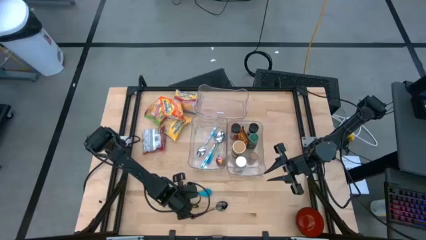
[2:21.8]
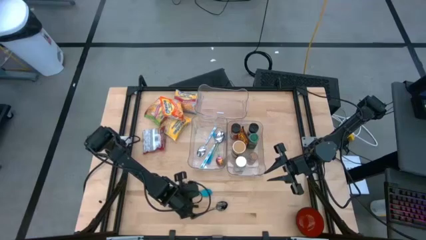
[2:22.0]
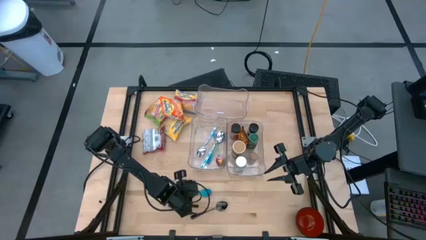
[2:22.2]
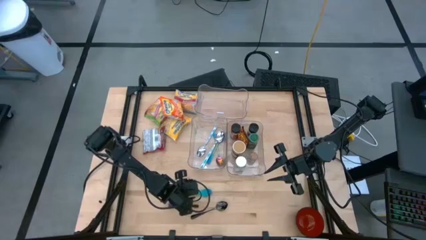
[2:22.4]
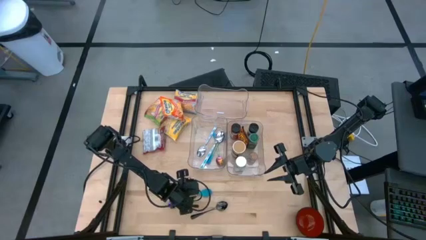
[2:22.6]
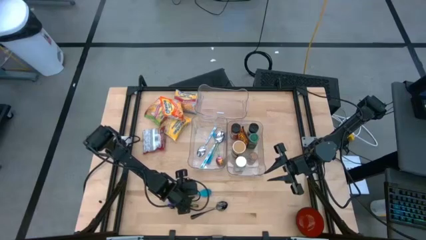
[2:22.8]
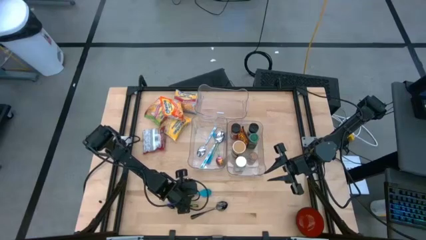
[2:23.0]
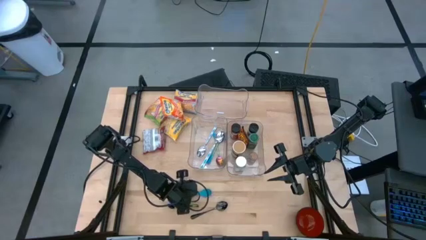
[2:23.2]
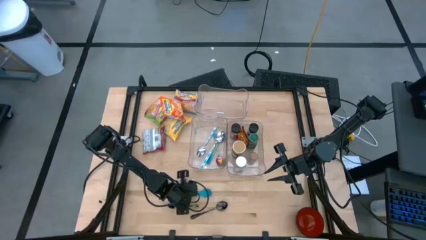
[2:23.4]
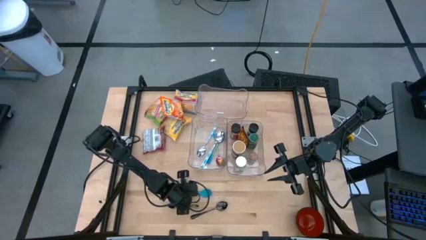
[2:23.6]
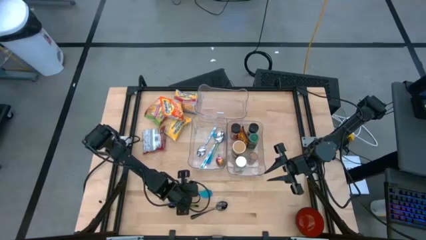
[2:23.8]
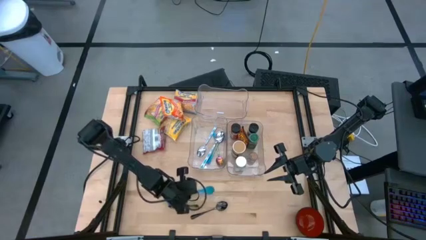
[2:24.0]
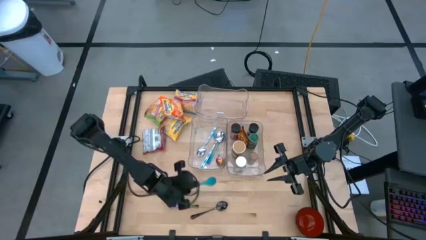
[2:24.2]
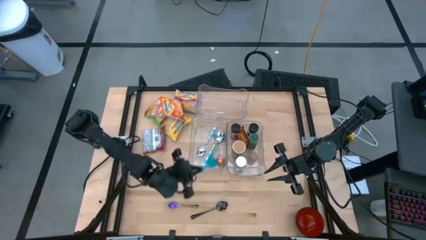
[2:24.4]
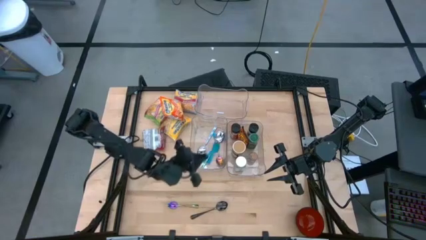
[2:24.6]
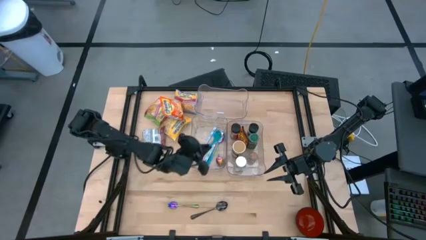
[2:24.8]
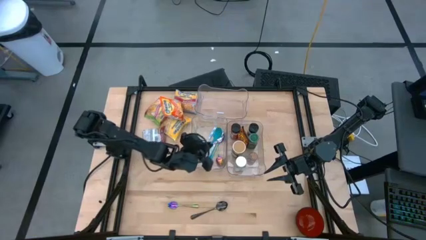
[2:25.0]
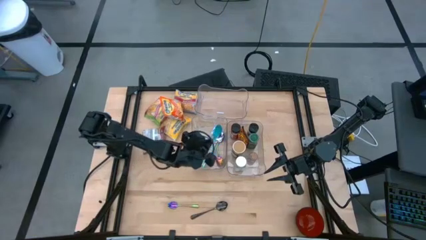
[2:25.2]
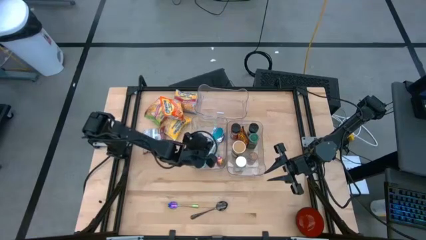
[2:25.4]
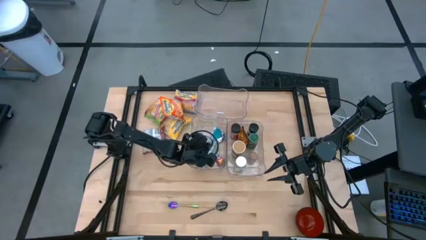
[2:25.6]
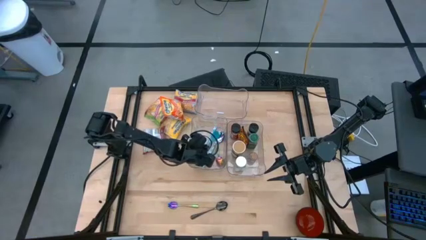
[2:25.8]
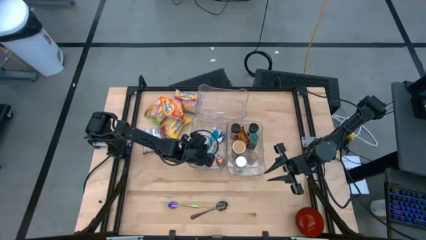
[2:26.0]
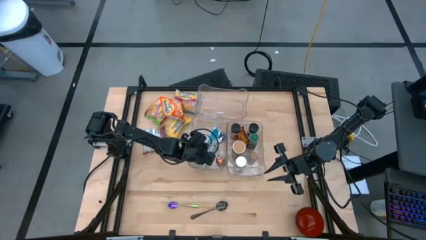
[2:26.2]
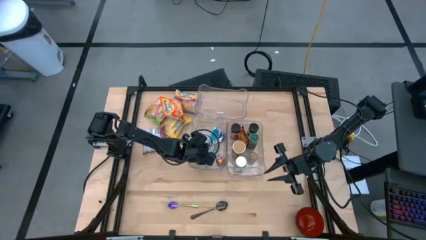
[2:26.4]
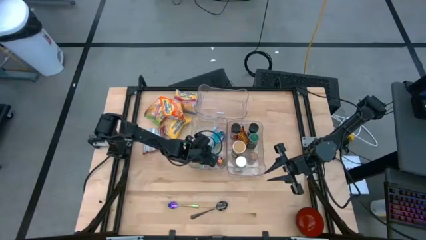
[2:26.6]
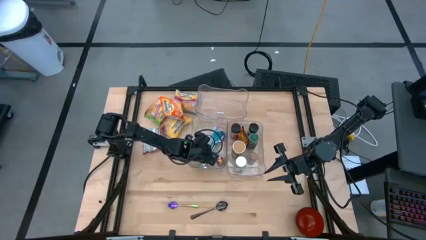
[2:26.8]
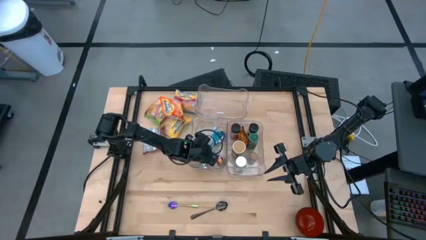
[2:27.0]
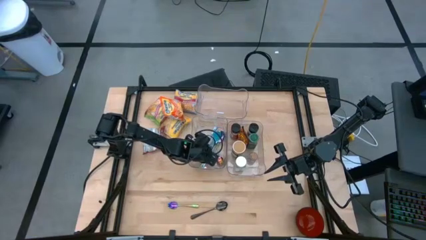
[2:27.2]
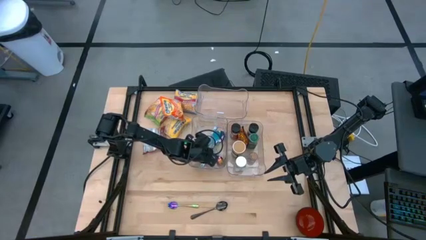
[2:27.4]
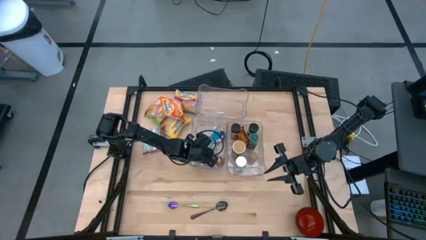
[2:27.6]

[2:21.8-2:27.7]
Task: Pick & Place Food Item
Put the blue spoon into the bottom left transparent bin

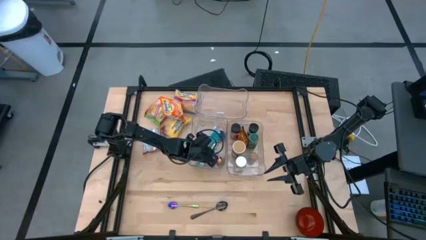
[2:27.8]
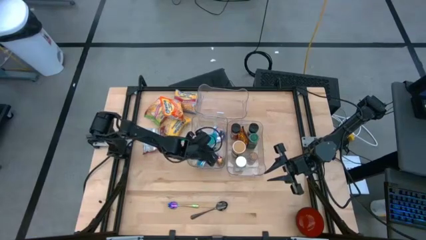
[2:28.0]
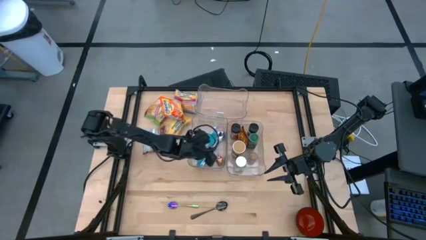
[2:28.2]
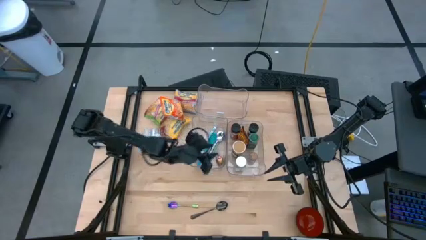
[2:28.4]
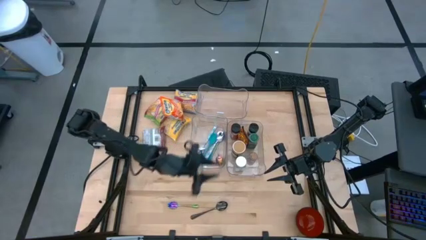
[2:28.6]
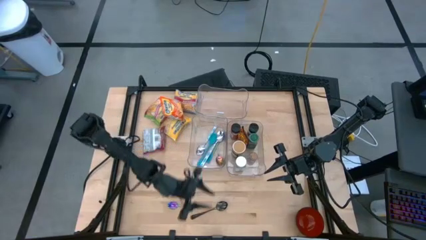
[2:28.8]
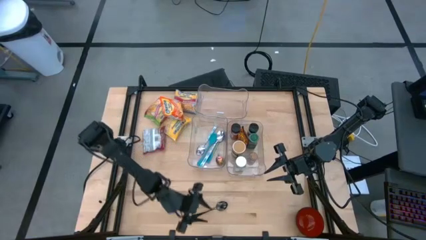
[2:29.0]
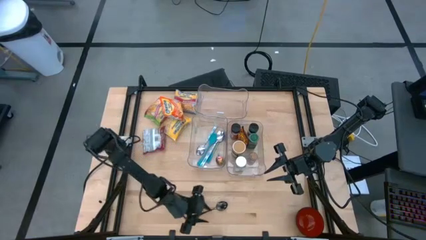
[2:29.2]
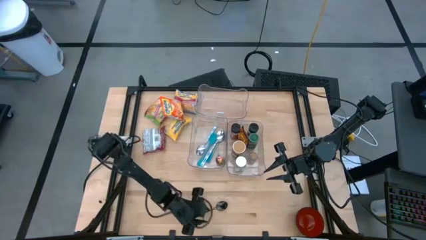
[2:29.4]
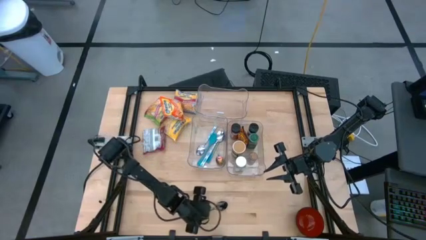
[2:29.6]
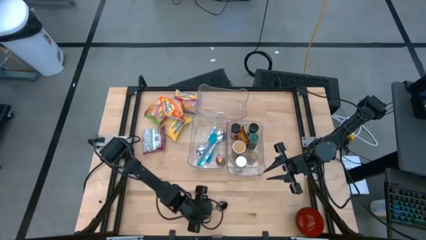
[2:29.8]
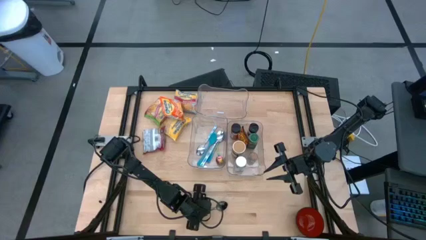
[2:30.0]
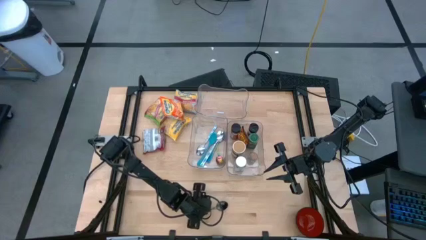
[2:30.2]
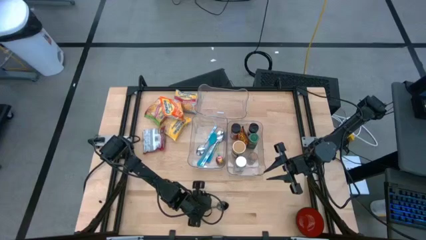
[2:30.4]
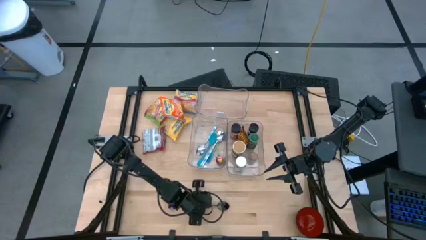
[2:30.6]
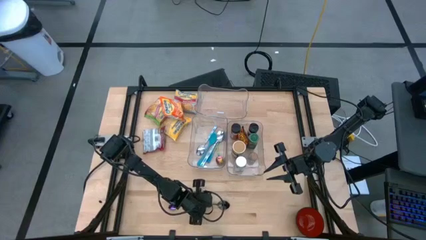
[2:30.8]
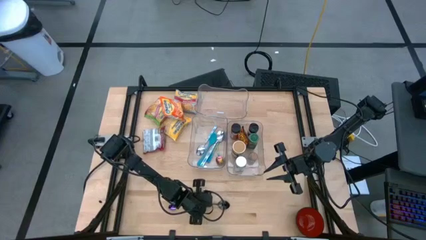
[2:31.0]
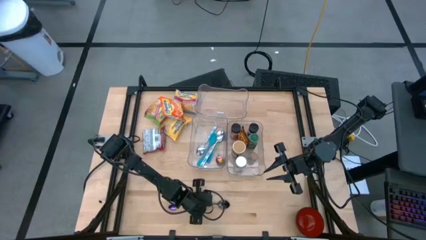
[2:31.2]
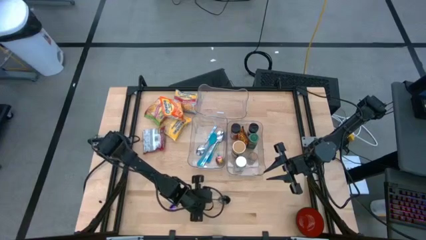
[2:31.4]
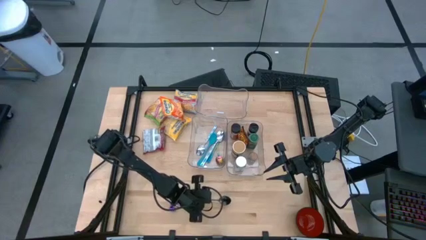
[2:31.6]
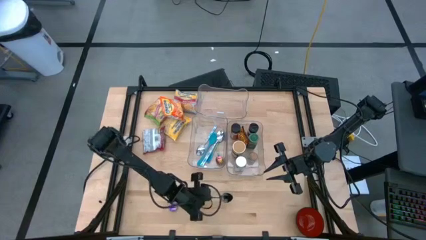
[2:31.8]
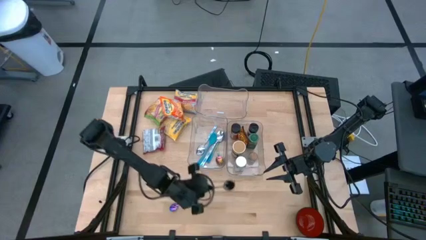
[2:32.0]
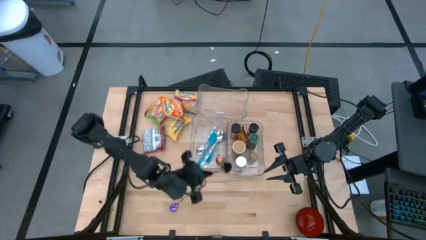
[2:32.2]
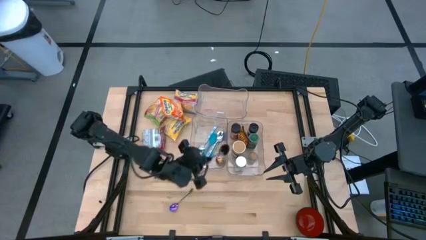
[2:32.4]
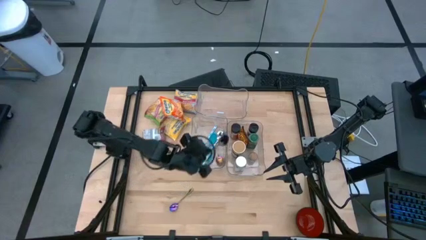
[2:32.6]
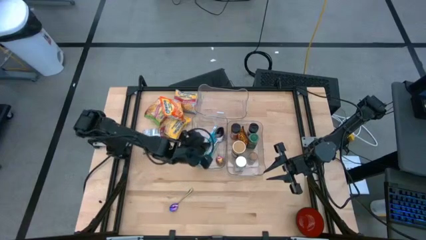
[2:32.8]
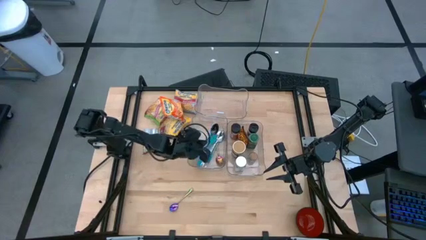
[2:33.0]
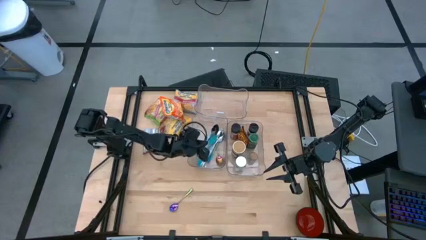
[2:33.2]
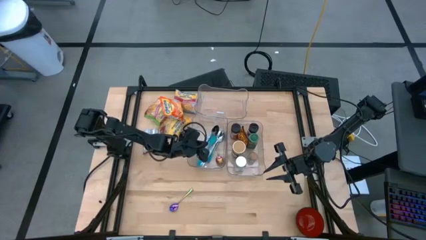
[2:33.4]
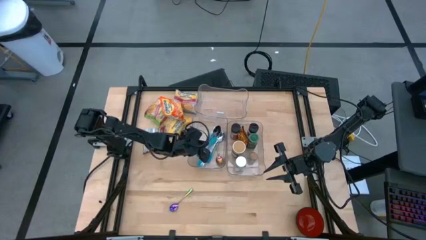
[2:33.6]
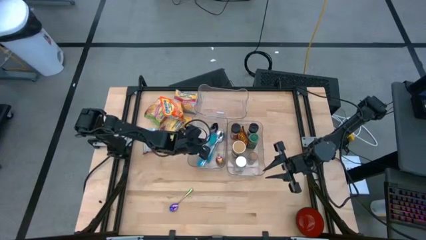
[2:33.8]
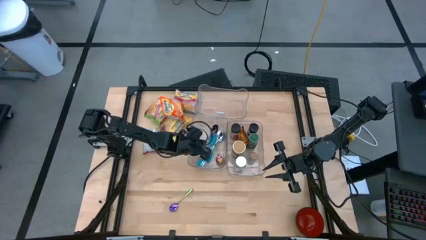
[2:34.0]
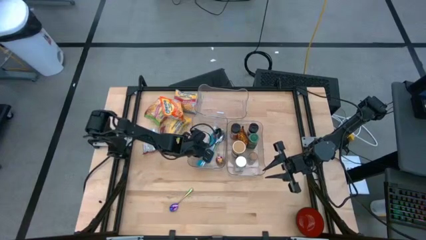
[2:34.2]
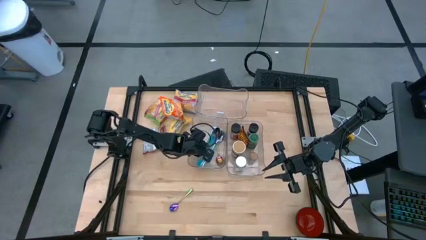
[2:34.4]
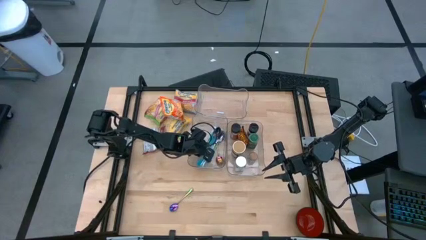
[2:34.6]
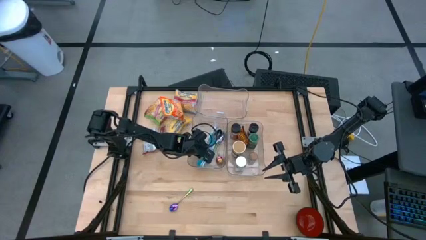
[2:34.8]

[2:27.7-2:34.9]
Put the black spoon into the bottom left transparent bin

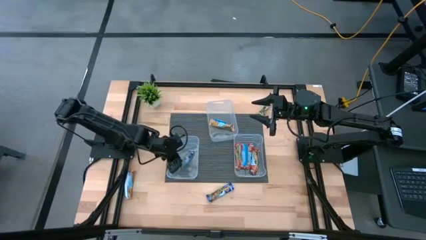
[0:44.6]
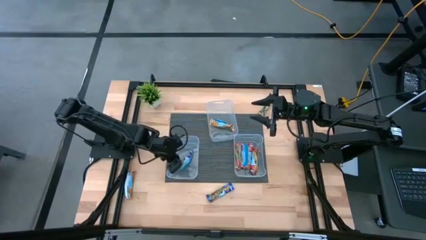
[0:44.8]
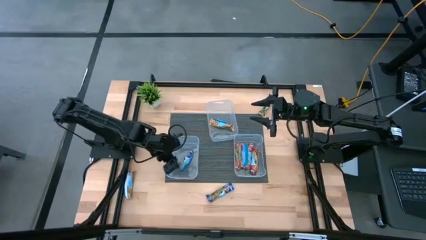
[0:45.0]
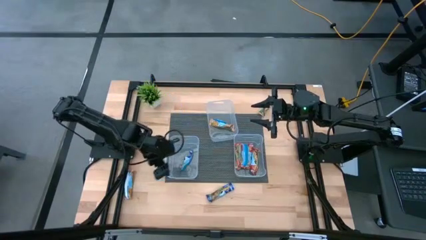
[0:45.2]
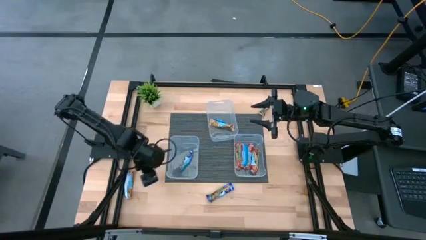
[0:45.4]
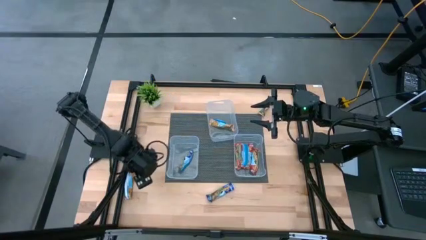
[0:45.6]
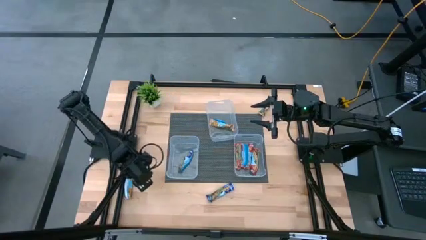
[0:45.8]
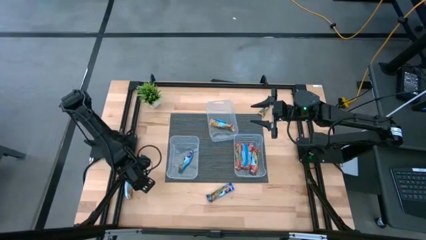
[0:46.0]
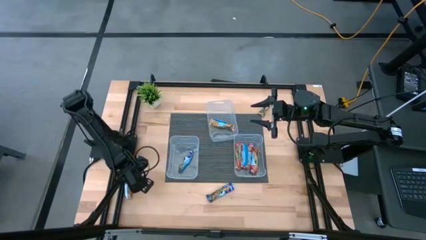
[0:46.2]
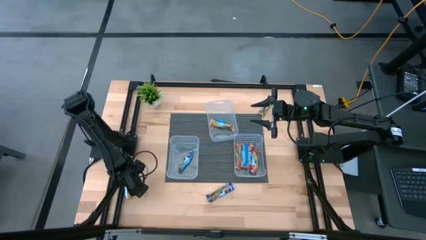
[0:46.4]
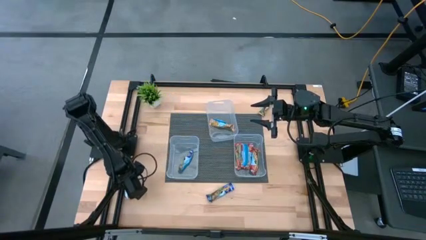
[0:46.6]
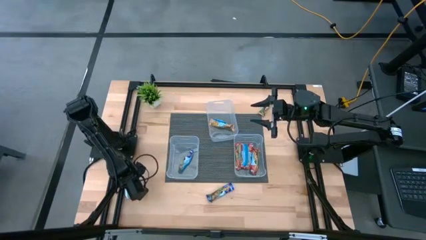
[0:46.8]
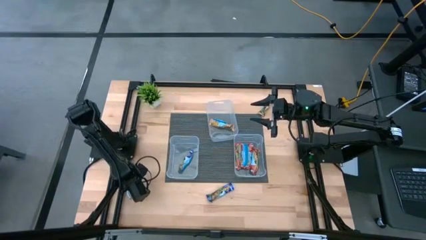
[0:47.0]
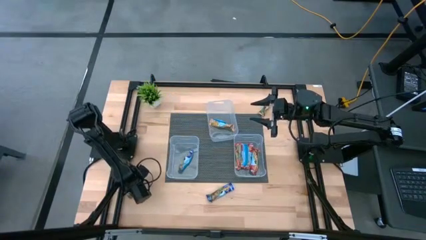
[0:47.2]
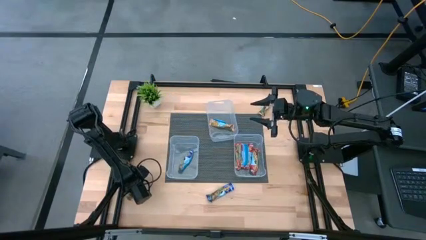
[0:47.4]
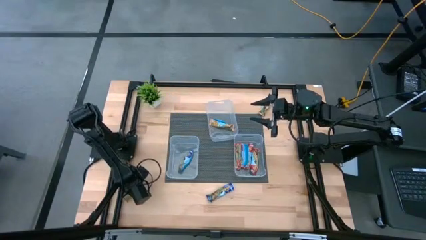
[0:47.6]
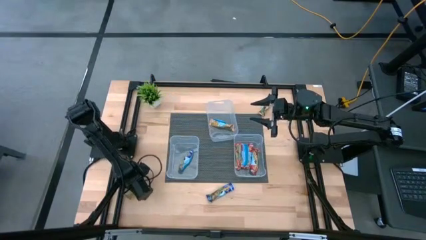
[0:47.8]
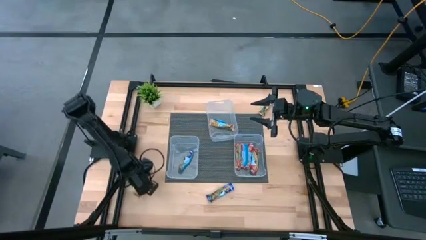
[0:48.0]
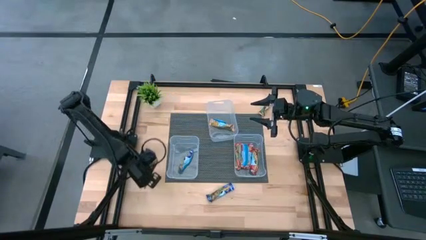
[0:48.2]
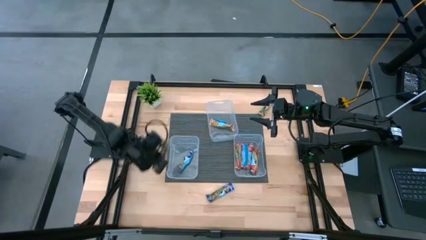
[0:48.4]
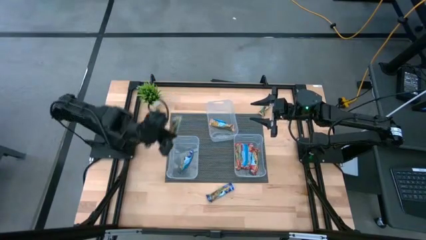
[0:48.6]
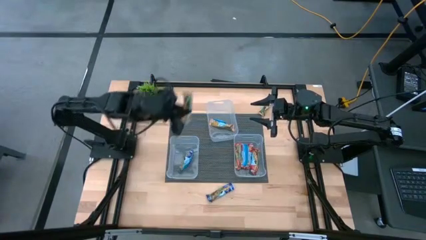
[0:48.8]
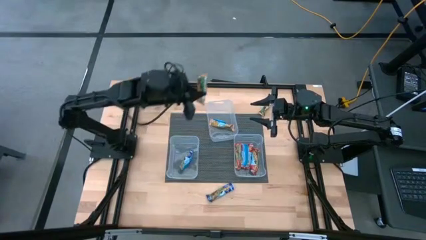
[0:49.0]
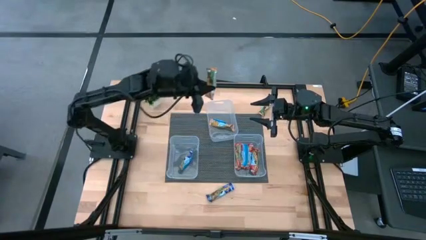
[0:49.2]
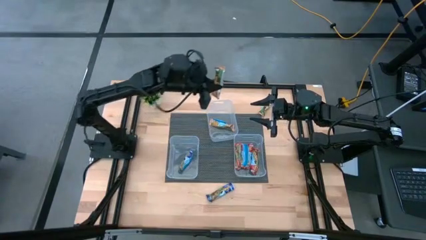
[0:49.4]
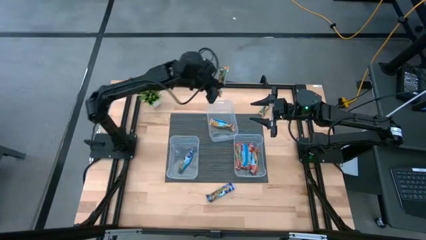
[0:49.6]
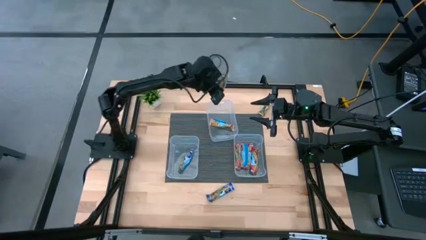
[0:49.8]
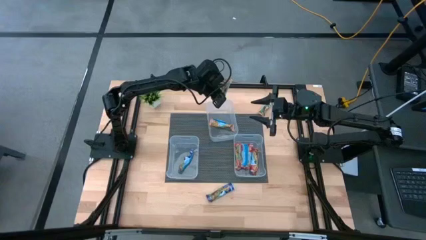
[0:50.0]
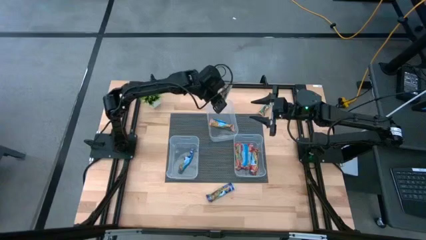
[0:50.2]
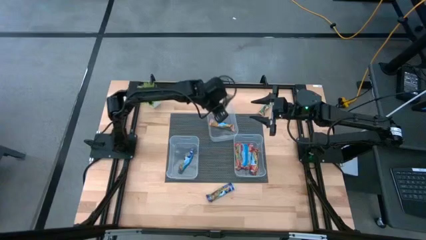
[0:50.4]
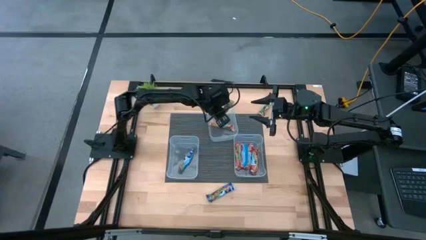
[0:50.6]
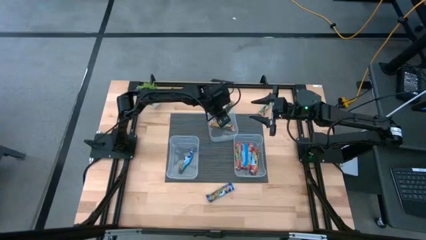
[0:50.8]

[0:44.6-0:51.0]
Task: Pick and place Granola Bars by type
Put the yellow granola bar into the top transparent bin
